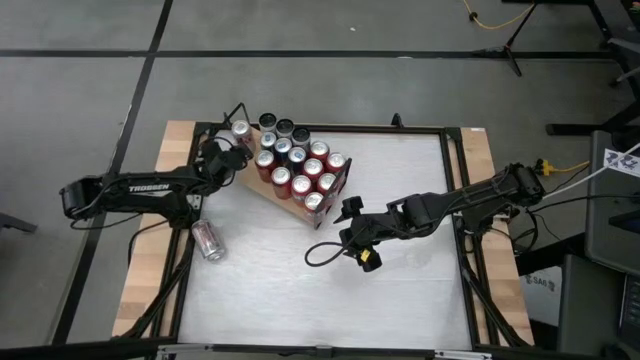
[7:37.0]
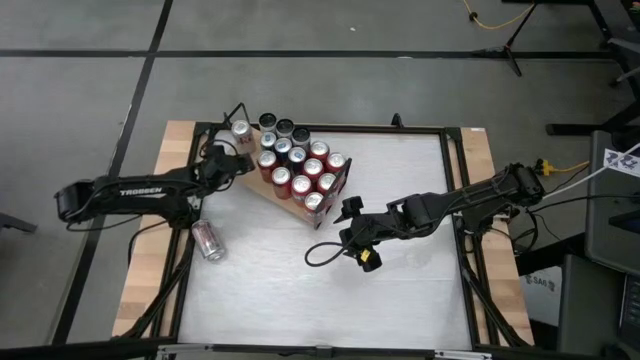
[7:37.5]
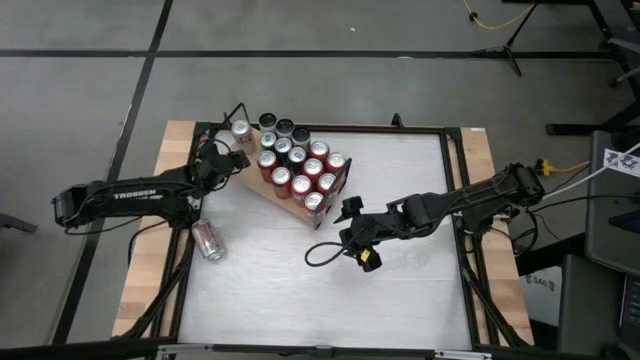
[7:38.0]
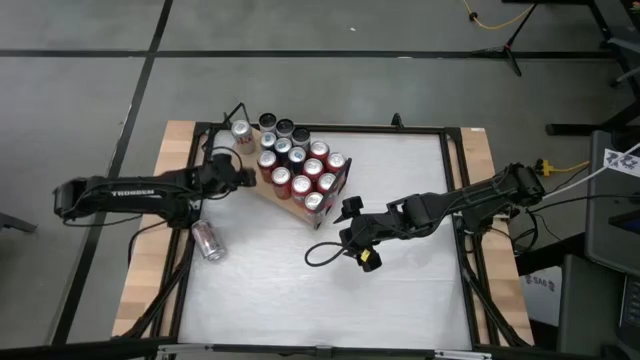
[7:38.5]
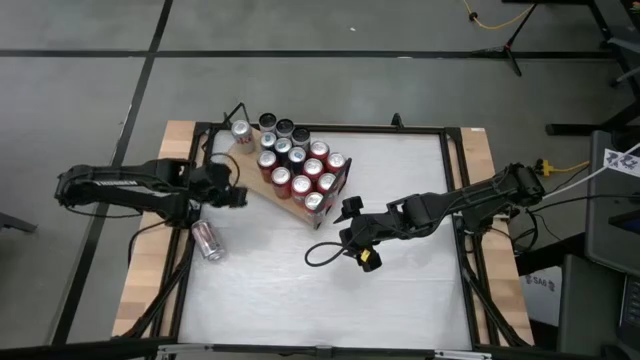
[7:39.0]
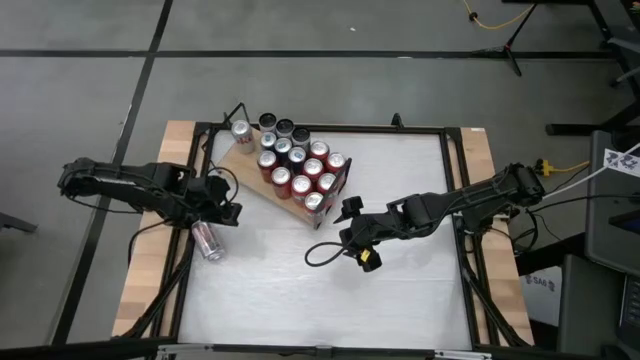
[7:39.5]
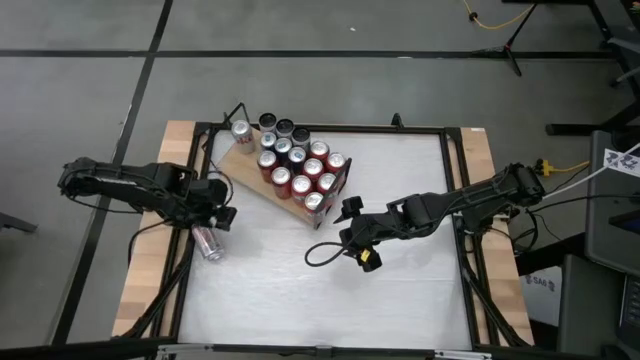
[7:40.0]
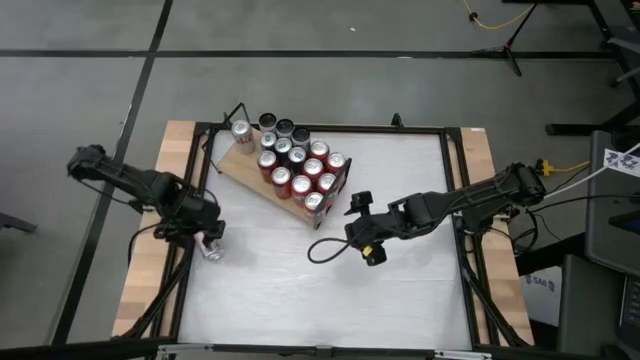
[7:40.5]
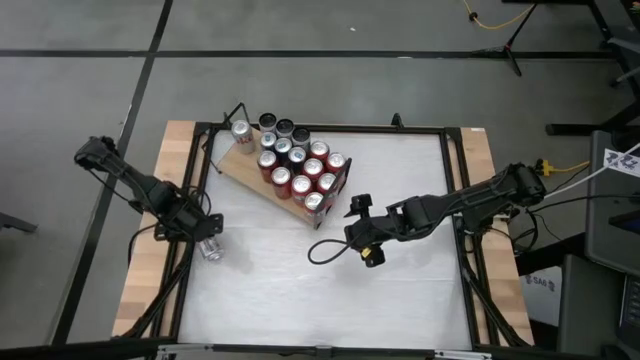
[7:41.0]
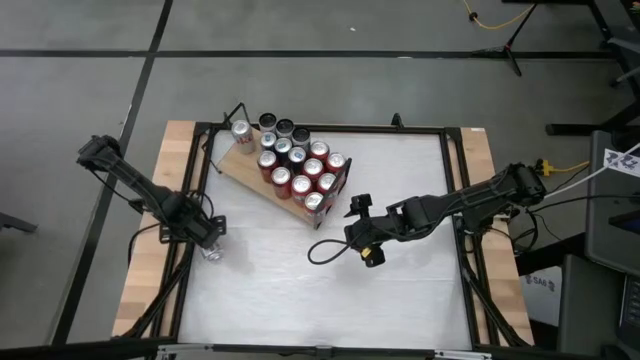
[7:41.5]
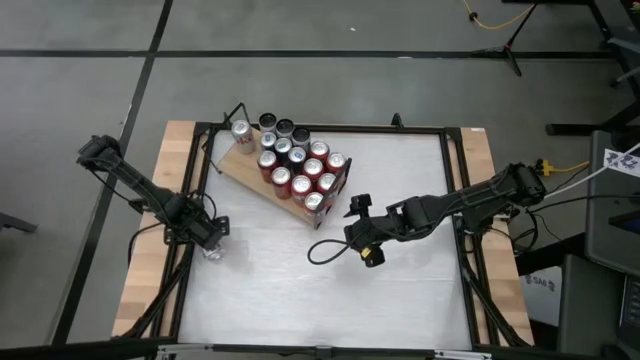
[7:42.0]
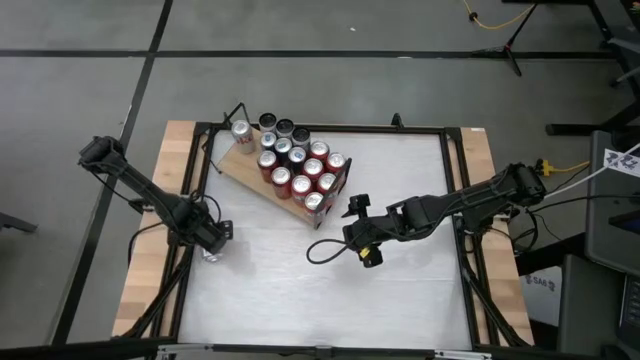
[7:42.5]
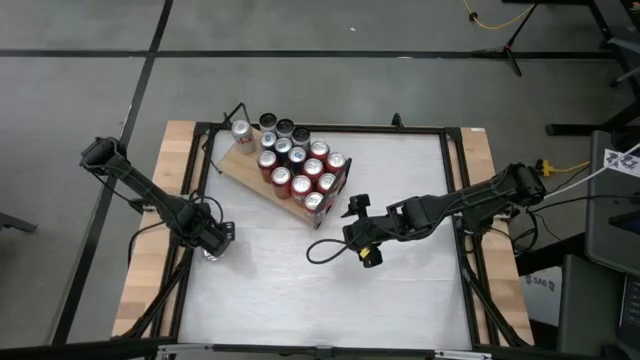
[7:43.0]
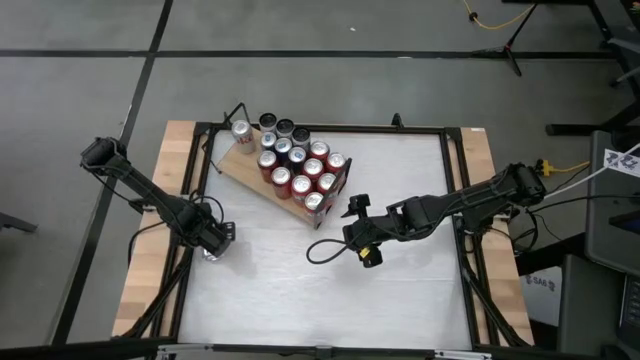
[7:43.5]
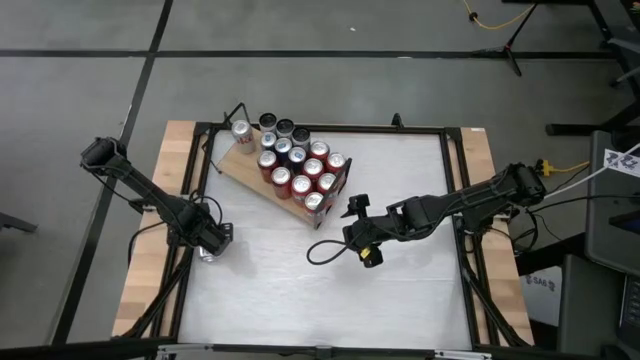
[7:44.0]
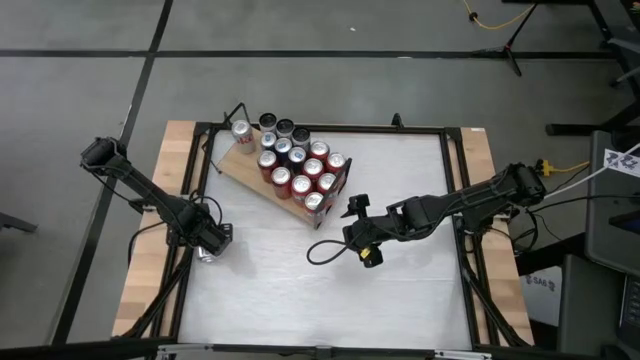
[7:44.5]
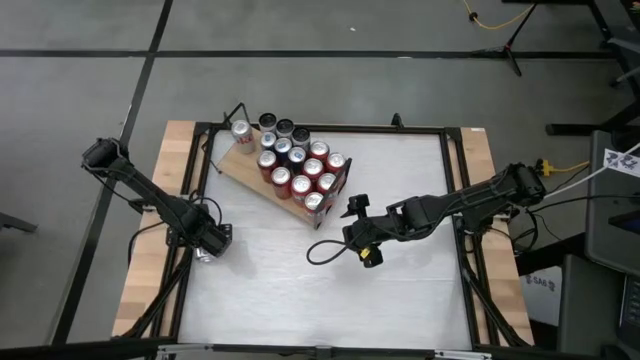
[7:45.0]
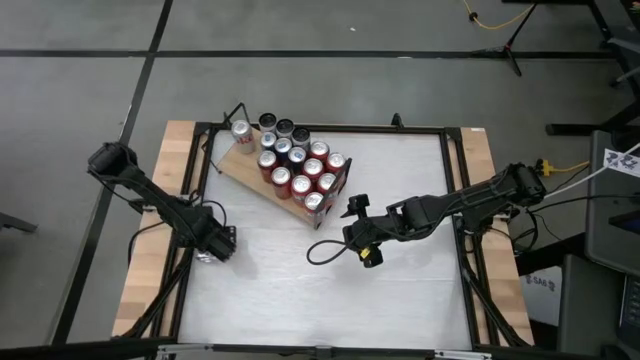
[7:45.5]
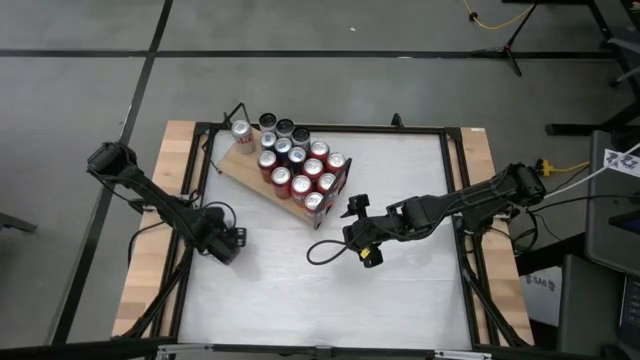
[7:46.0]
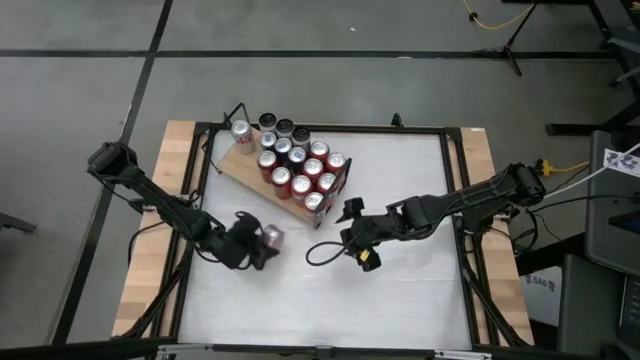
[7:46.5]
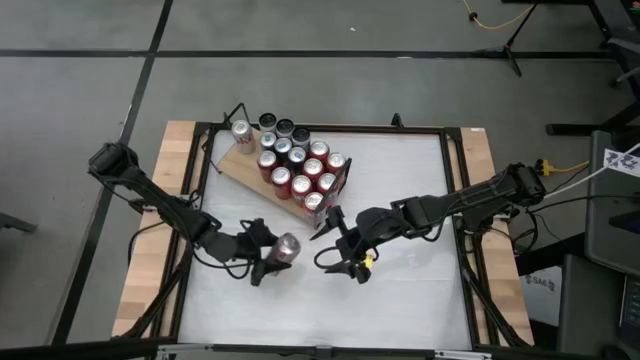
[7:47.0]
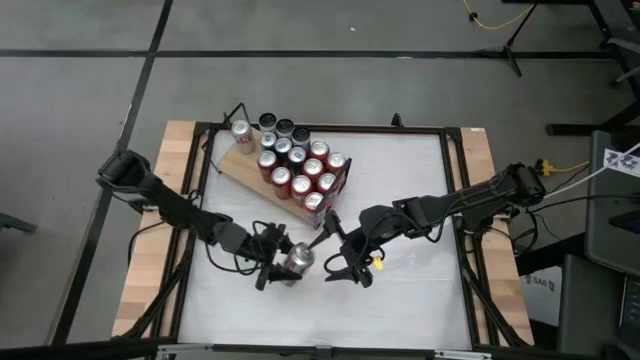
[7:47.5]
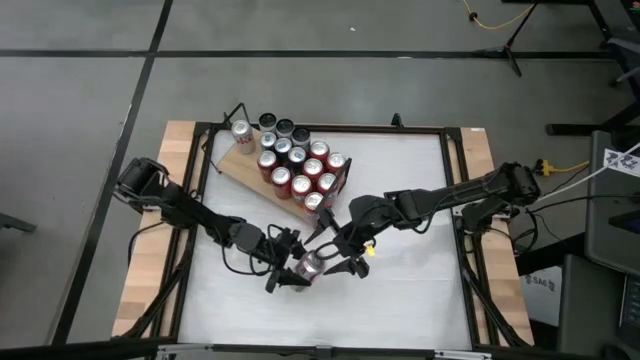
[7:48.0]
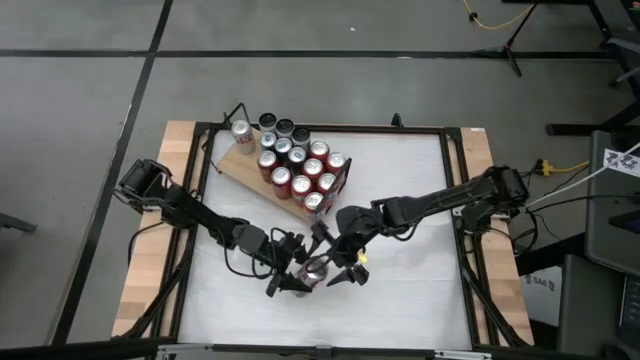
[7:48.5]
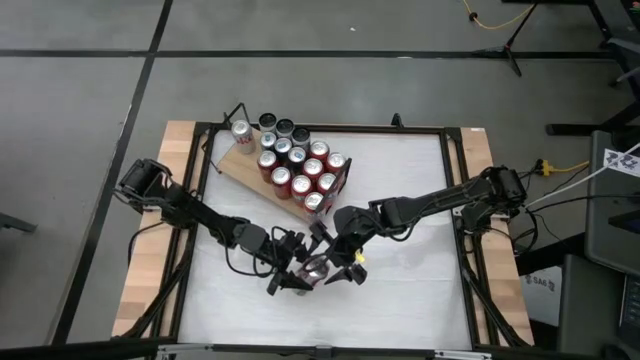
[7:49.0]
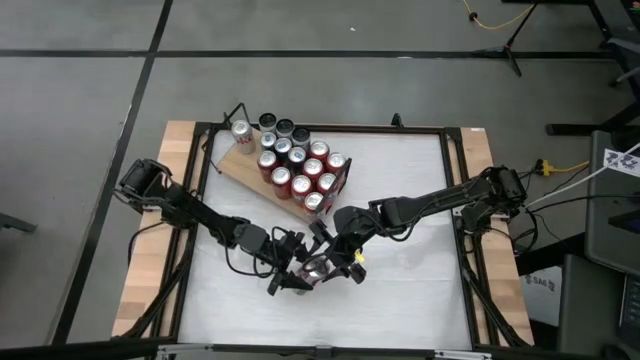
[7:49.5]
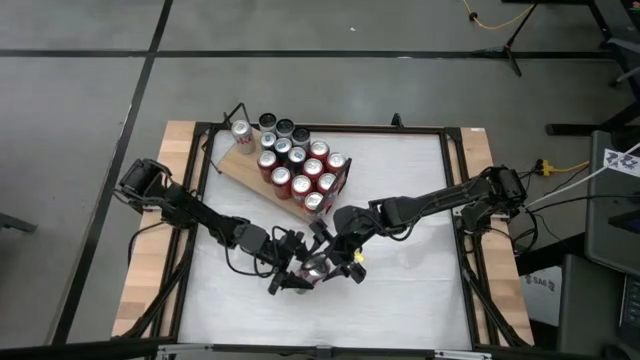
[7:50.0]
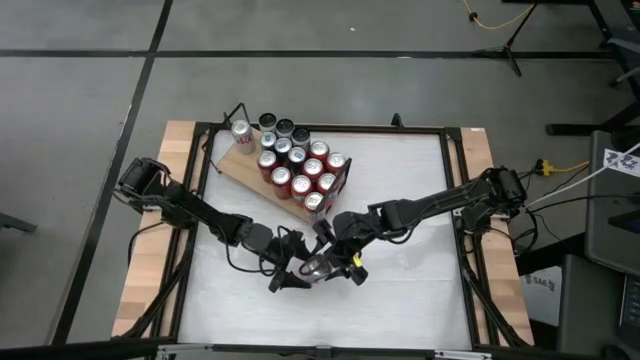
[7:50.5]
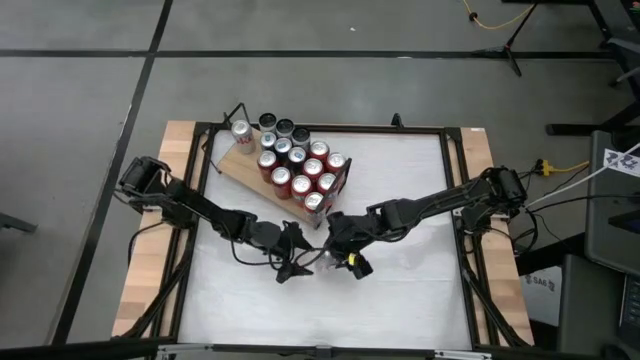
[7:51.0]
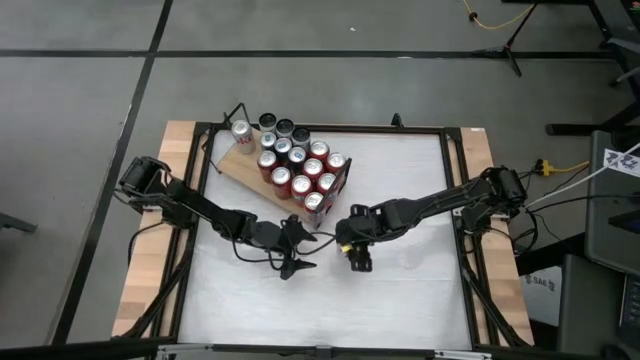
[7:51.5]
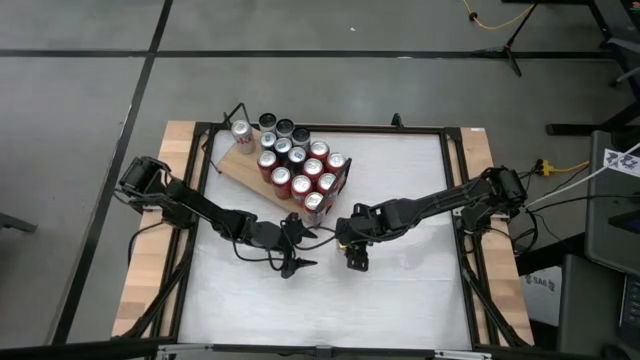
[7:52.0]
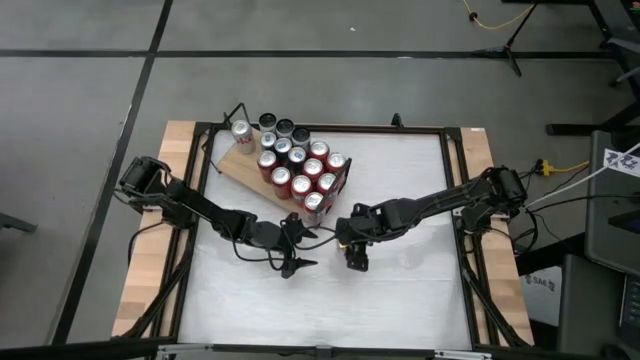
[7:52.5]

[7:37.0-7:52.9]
Task: Pick and place cans onto a shelf
Put the red/silver soda can on the shelf and align with the other red/silver soda can

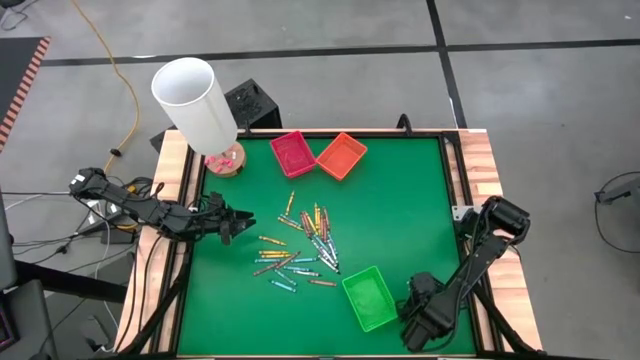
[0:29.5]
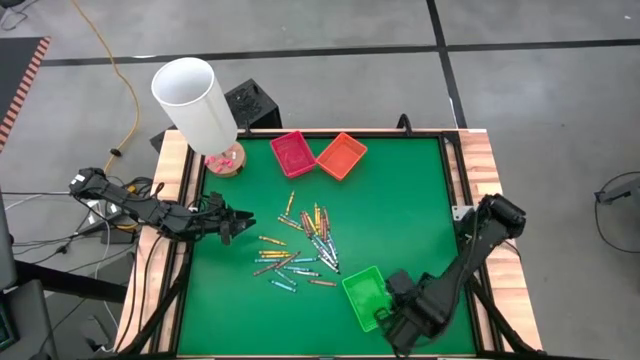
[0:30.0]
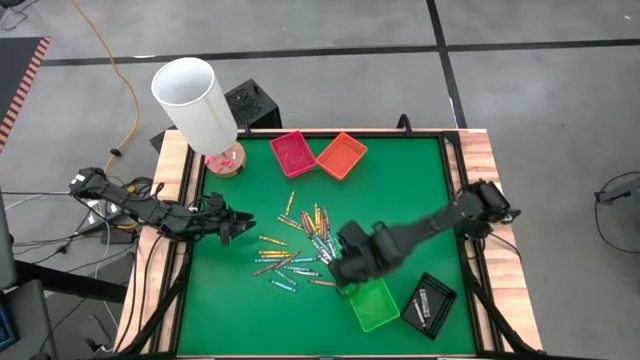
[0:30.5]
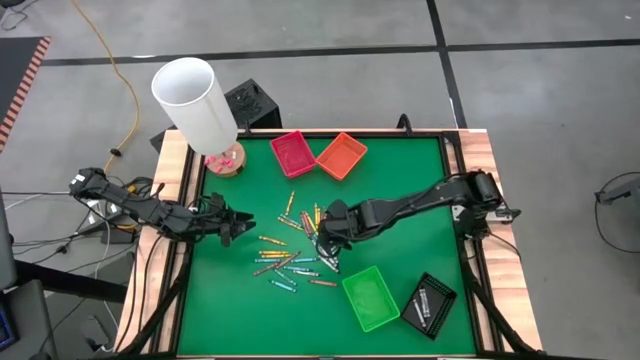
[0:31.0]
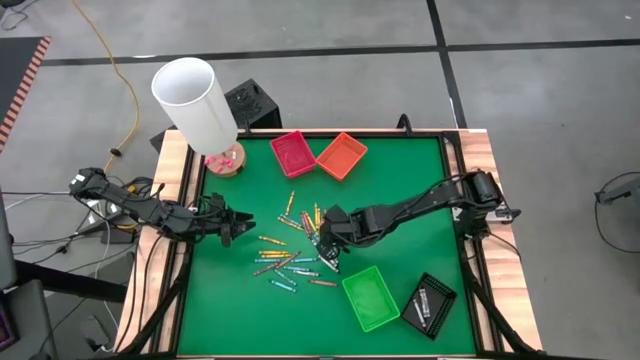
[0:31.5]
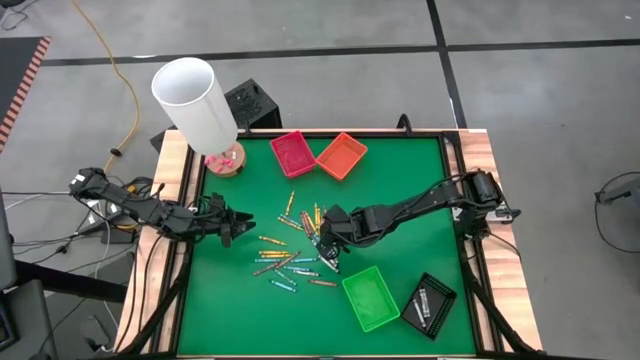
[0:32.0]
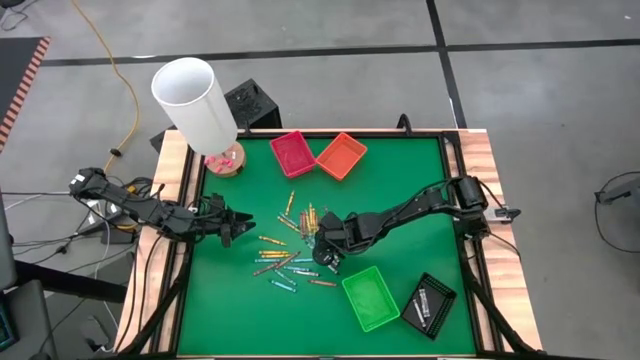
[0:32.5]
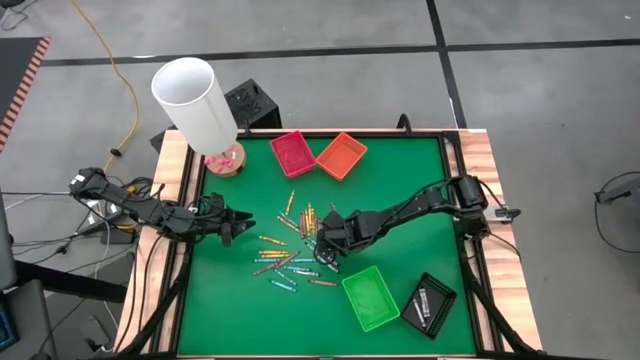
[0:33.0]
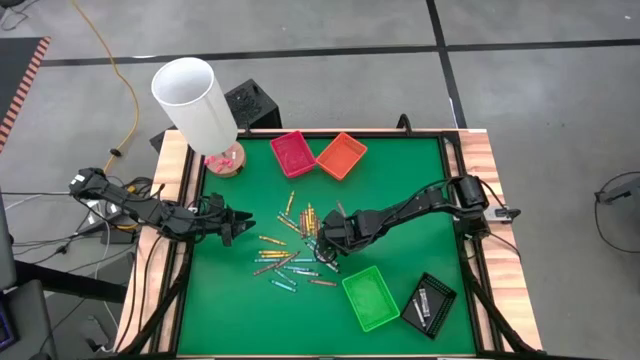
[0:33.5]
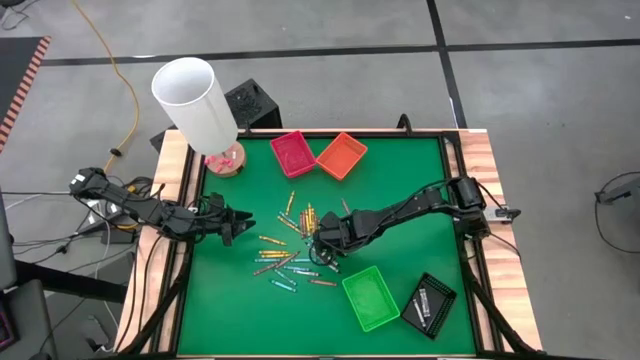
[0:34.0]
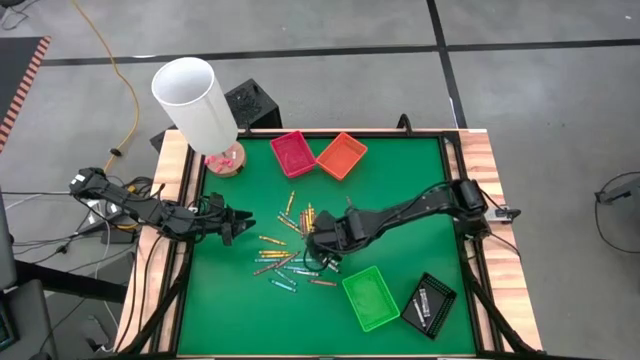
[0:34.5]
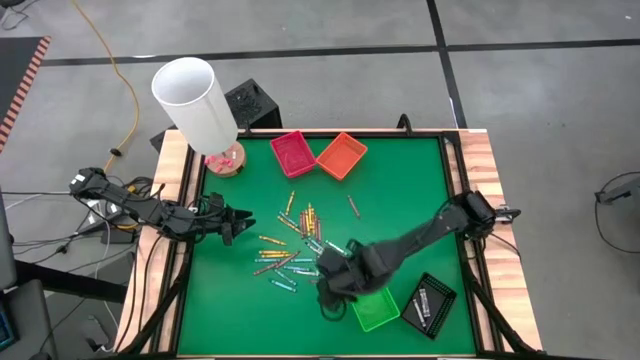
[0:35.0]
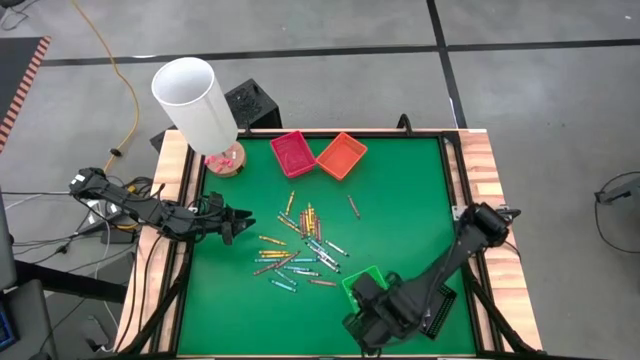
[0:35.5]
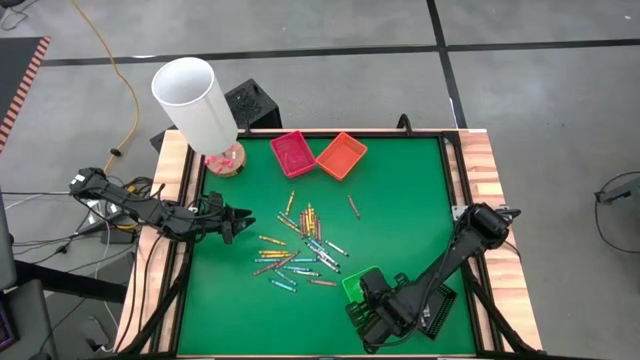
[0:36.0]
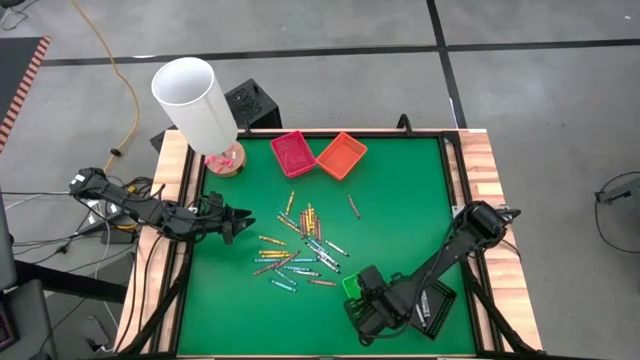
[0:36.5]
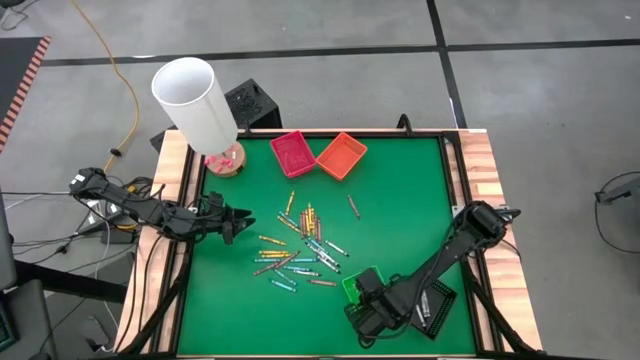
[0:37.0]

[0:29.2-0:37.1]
Task: Sort crayons
Put the green crayon into the green bin
